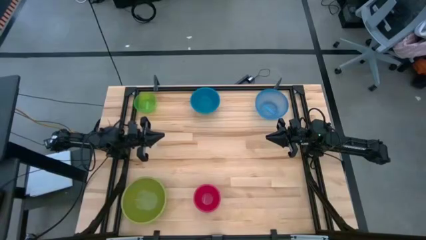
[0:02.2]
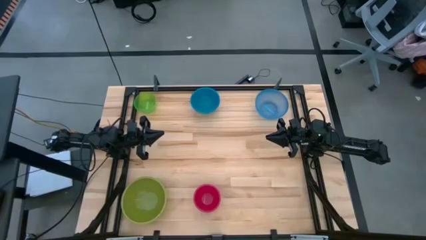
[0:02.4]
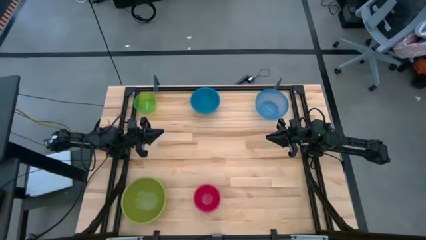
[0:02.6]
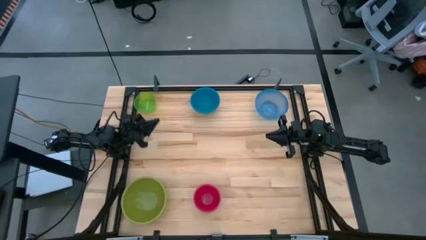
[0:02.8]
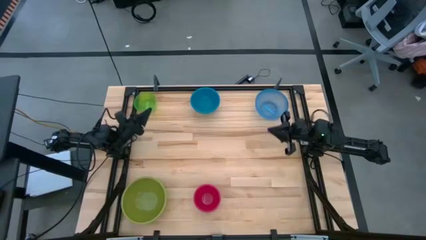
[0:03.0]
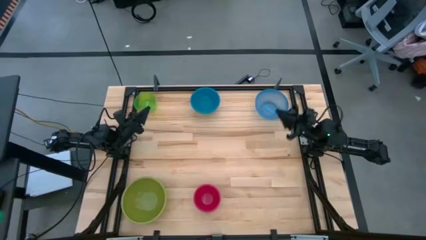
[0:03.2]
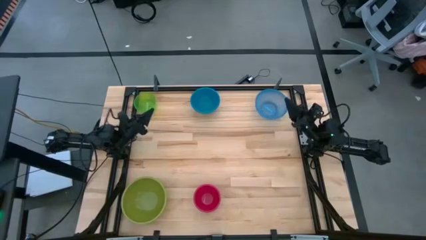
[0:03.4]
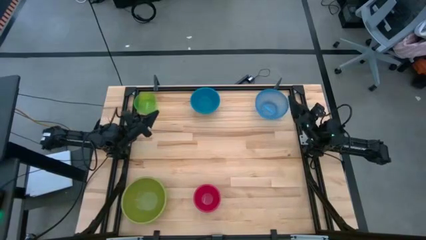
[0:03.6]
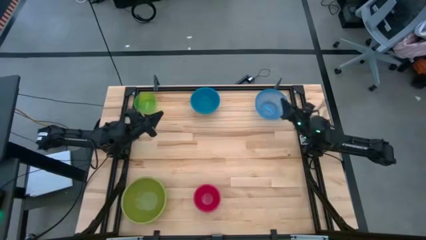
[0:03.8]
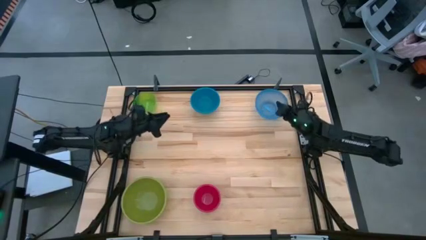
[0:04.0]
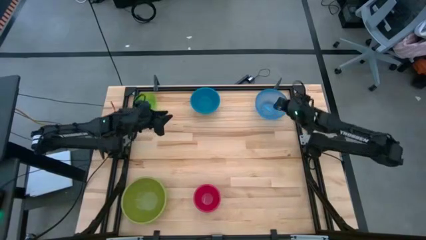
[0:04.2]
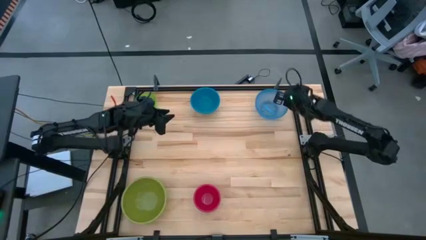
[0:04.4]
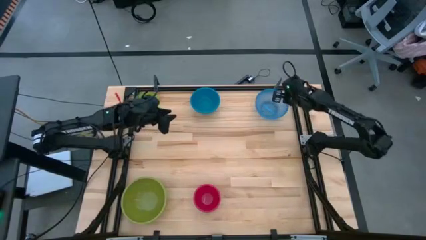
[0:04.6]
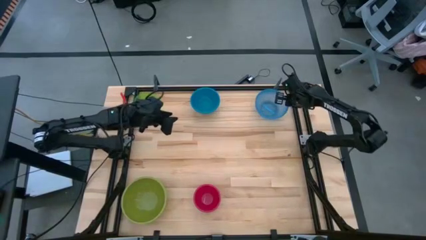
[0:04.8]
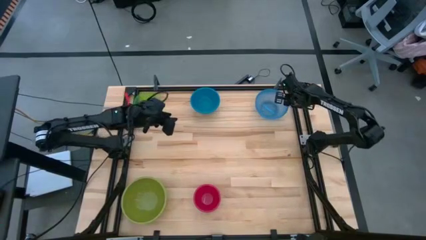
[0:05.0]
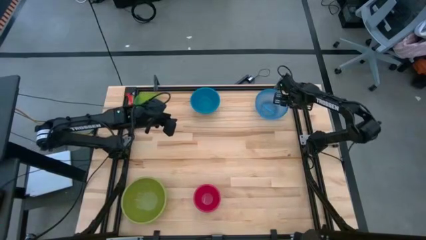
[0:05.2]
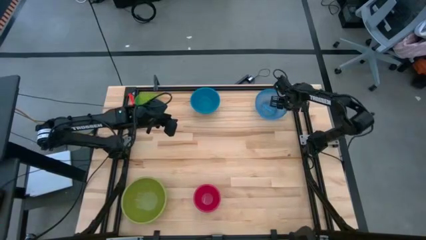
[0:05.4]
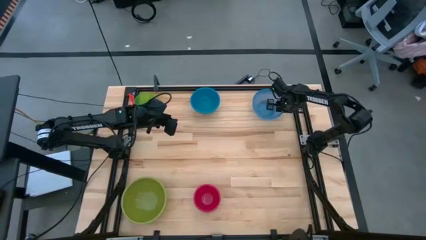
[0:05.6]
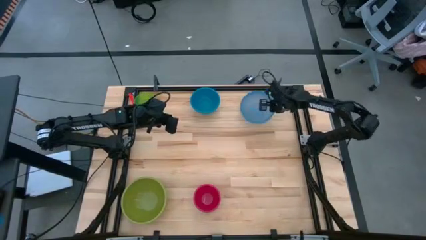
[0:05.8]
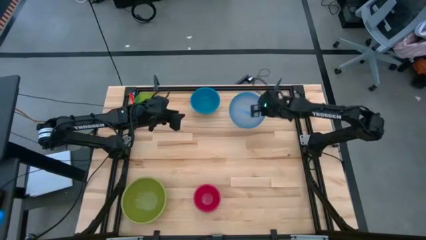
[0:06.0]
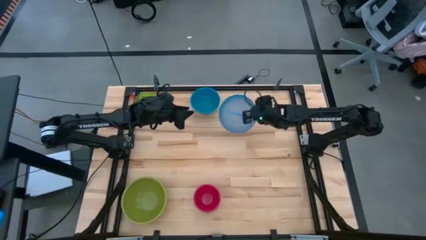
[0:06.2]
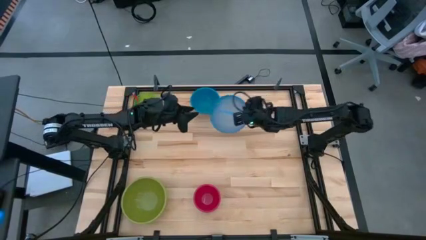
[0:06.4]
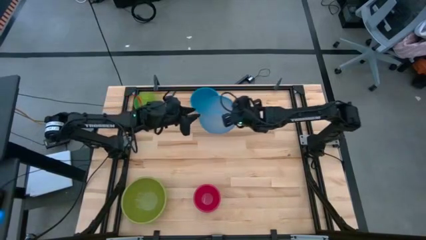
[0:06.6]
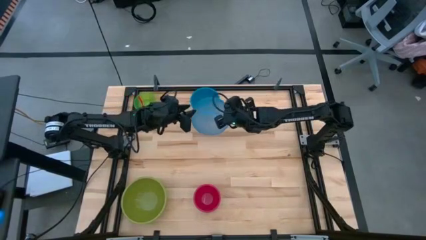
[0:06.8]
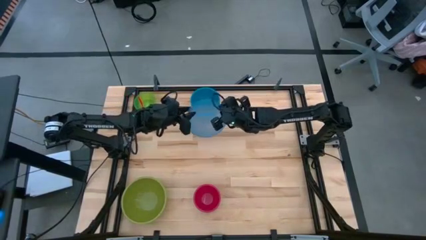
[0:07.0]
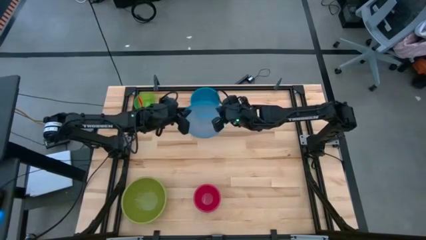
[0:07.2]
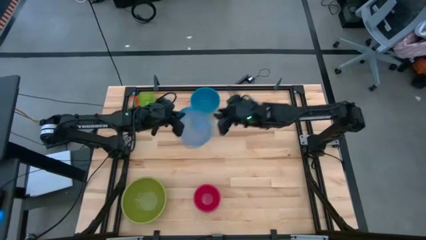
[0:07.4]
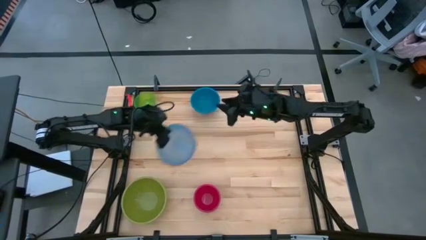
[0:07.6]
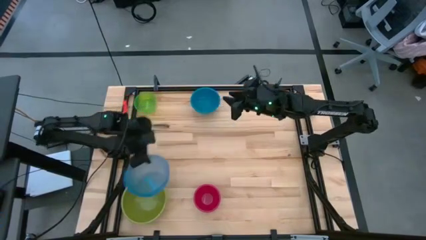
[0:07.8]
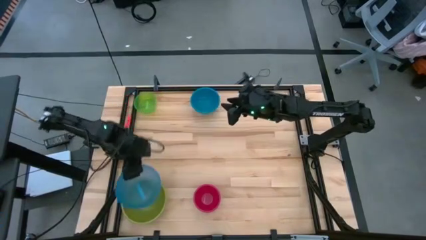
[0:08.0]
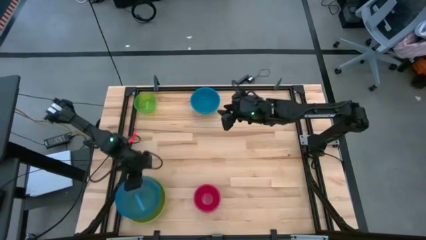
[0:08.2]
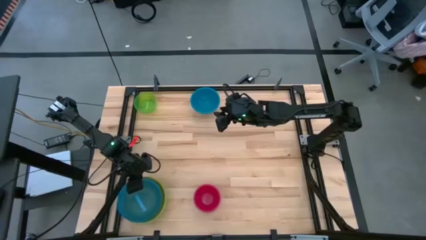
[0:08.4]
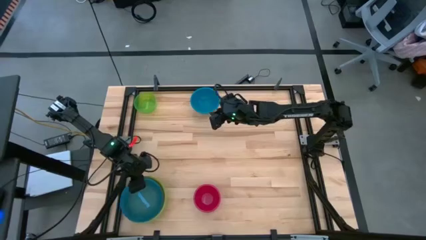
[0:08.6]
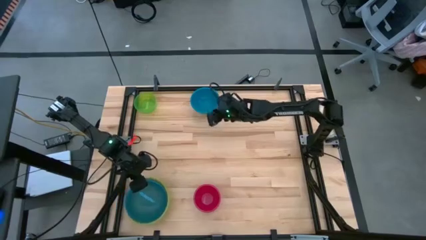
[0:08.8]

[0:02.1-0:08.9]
Stack the light blue bowl on top of the dark green bowl

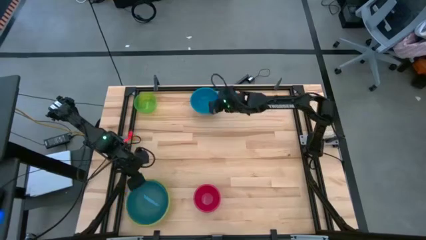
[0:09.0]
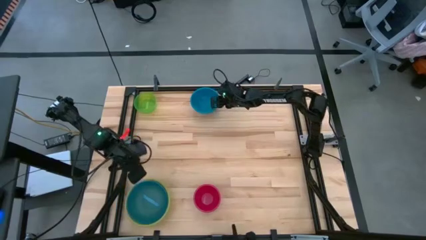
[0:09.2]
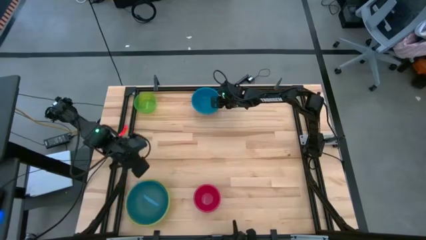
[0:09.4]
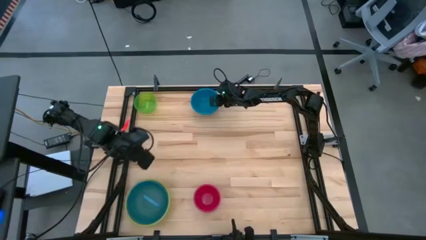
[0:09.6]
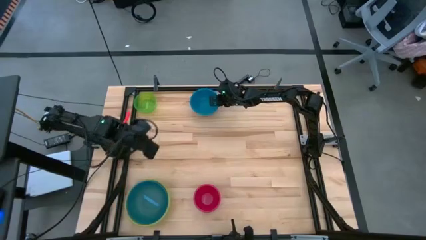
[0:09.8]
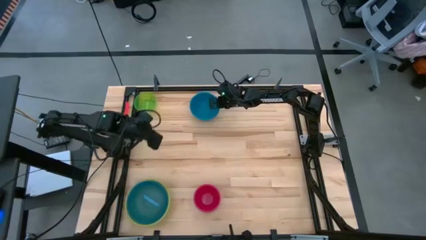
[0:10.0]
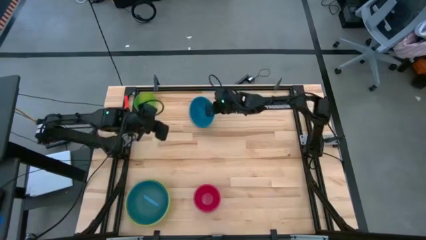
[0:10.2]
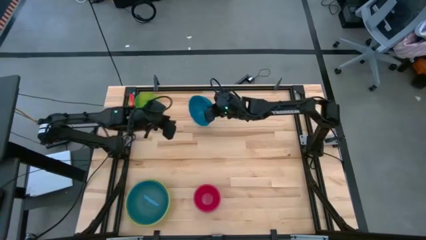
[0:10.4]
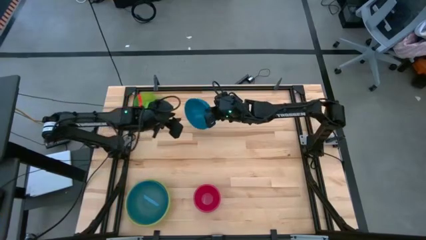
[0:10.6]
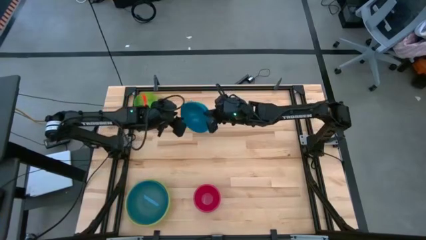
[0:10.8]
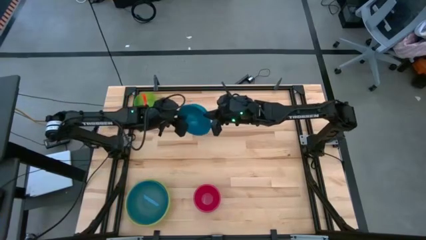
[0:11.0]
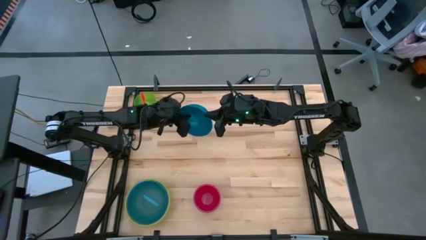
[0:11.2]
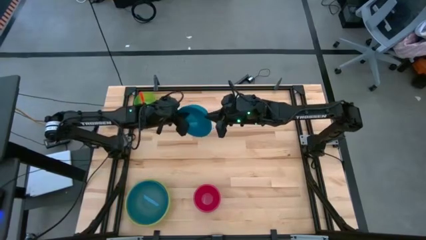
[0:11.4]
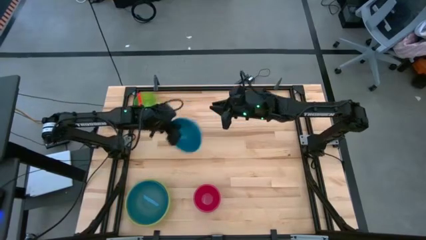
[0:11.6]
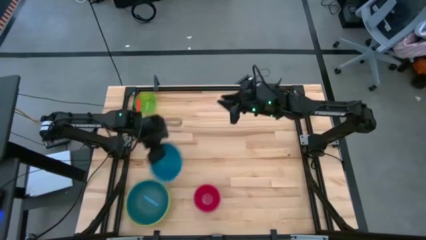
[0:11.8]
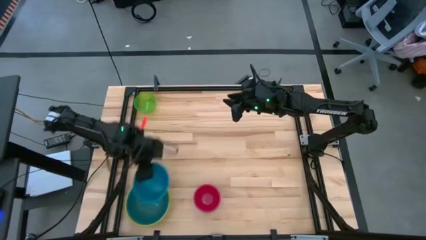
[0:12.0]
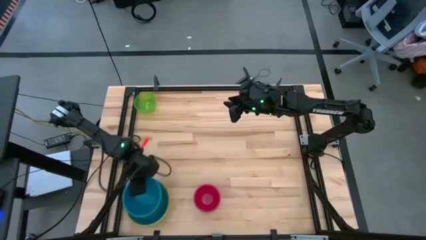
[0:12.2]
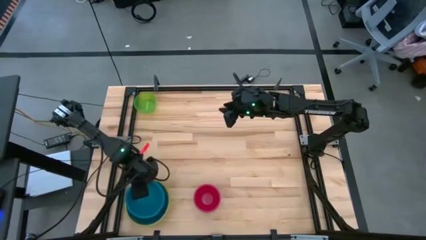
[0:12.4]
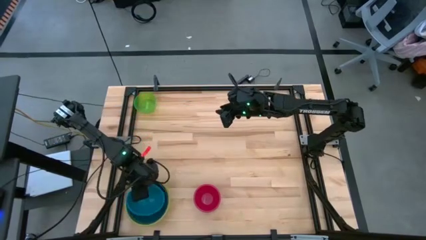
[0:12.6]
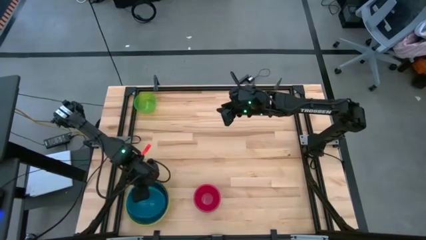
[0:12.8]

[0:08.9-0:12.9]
Stack the dark blue bowl on top of the light blue bowl

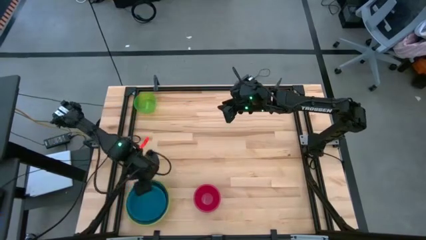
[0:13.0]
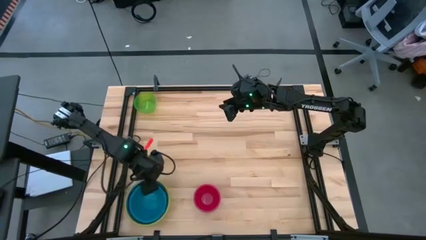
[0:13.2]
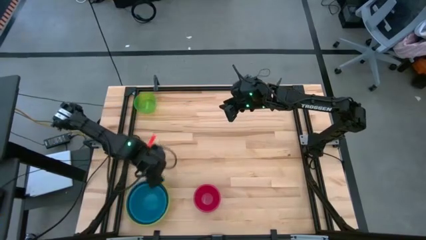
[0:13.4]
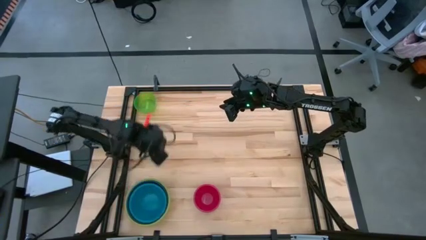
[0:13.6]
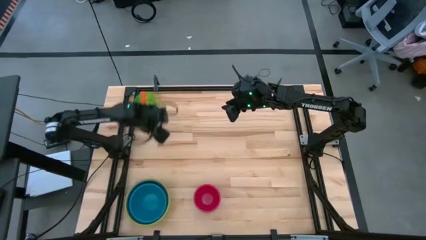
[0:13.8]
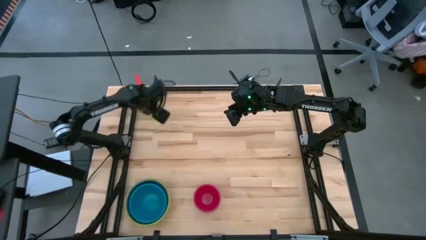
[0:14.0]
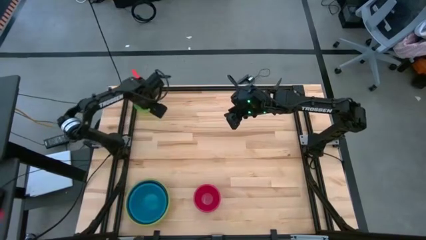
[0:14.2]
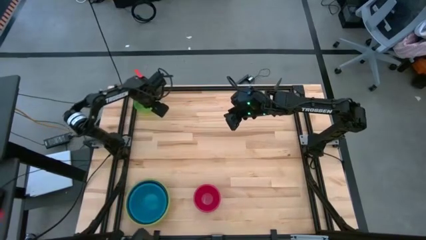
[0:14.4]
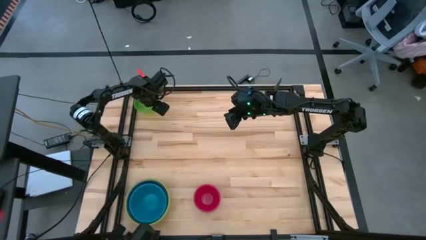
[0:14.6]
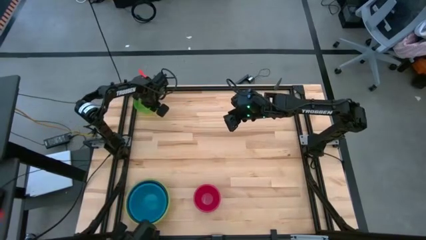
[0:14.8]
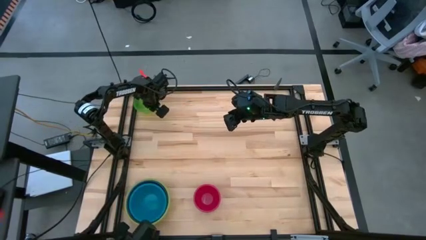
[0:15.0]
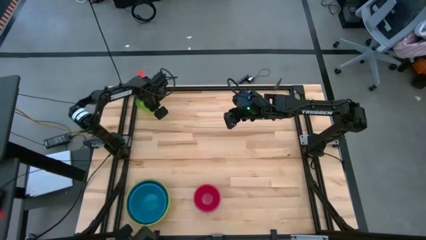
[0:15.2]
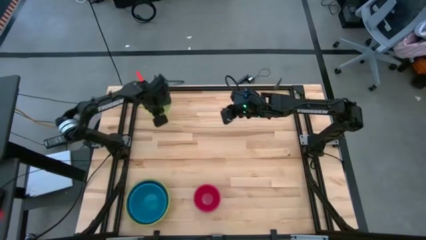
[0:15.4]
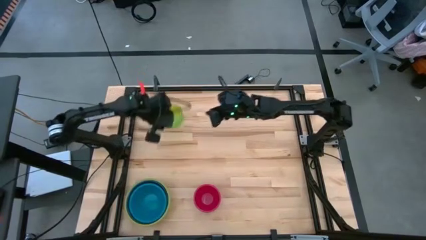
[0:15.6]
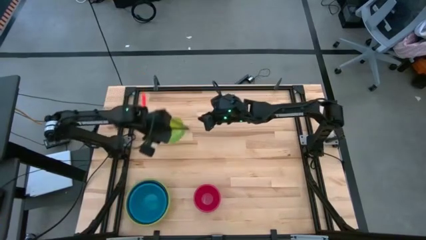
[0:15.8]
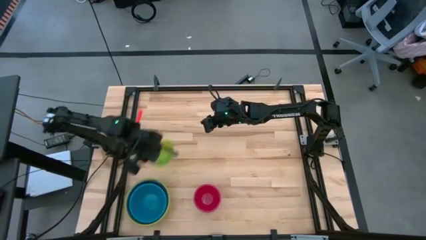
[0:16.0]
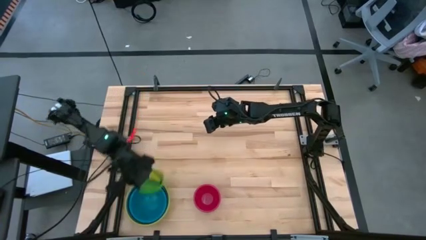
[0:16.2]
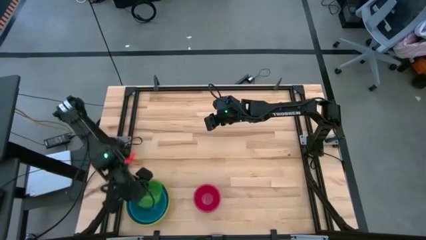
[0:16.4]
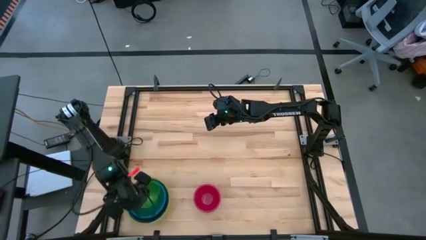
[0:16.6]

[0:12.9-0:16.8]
Stack the light green bowl on top of the dark blue bowl
